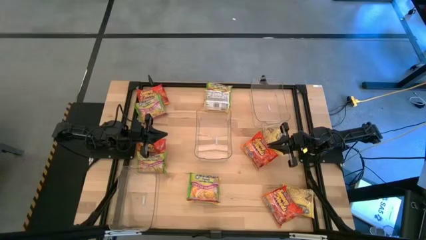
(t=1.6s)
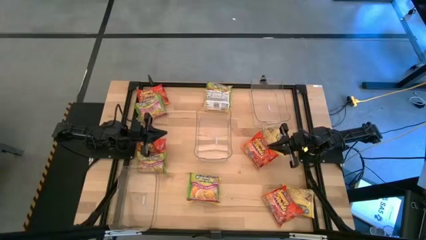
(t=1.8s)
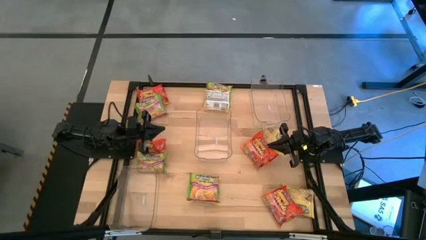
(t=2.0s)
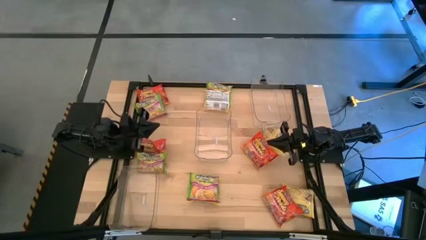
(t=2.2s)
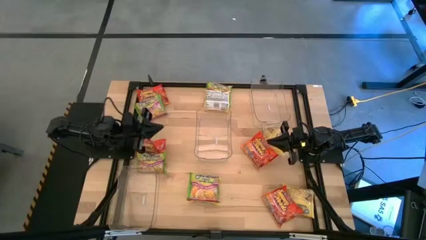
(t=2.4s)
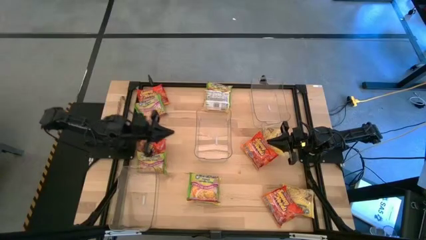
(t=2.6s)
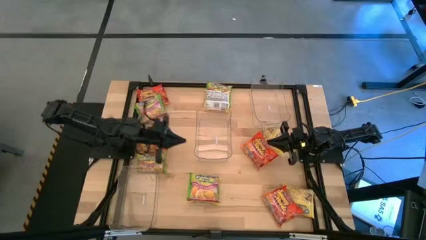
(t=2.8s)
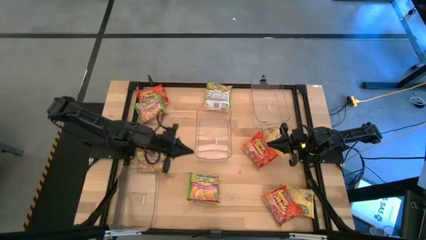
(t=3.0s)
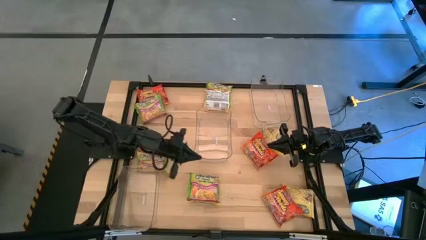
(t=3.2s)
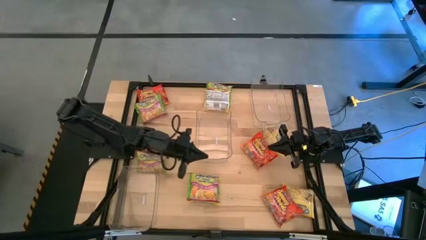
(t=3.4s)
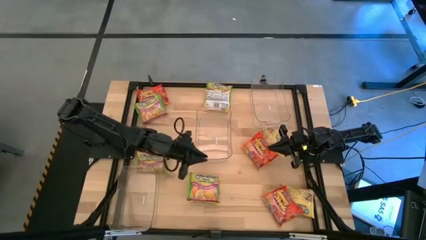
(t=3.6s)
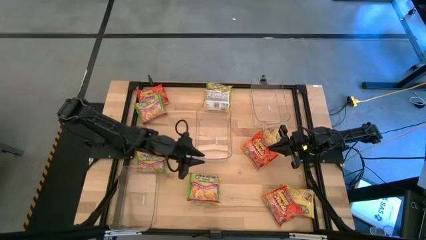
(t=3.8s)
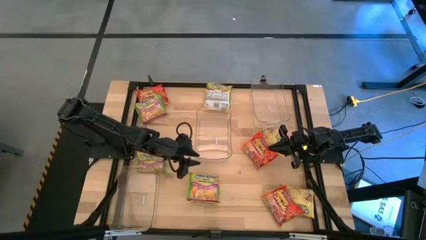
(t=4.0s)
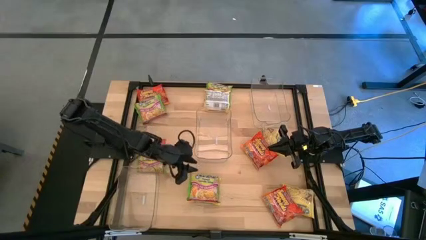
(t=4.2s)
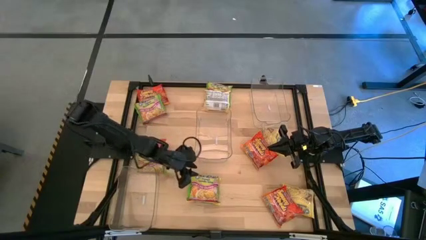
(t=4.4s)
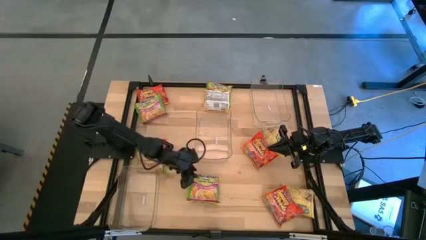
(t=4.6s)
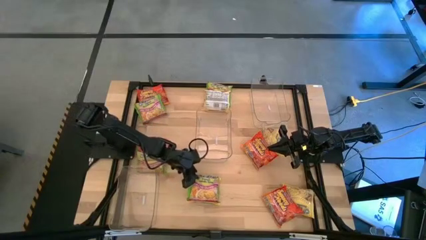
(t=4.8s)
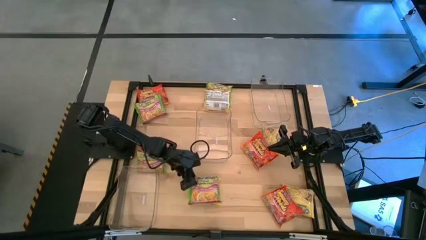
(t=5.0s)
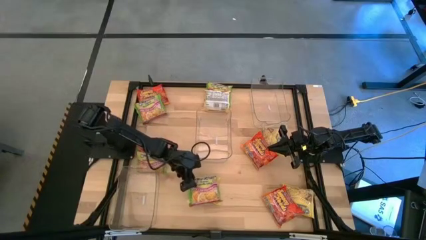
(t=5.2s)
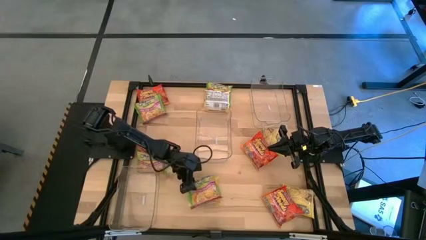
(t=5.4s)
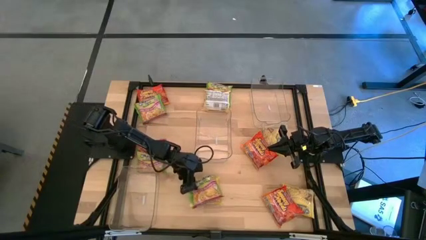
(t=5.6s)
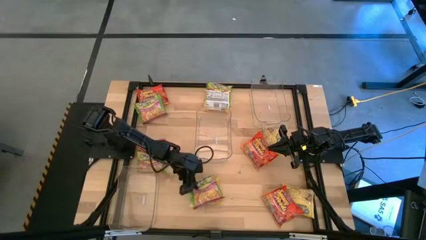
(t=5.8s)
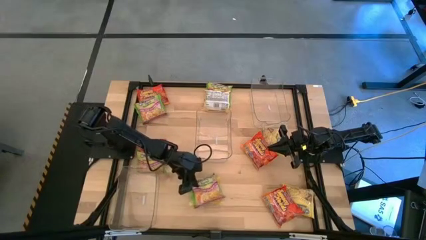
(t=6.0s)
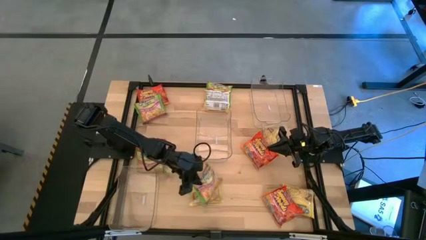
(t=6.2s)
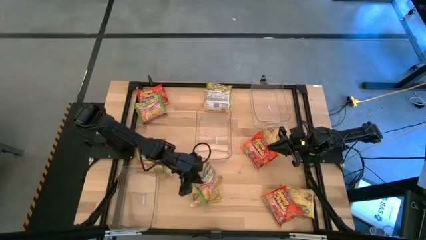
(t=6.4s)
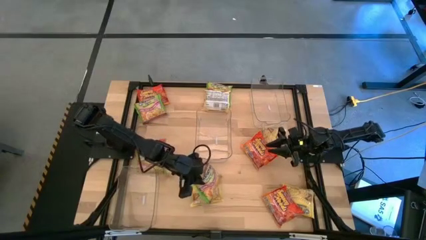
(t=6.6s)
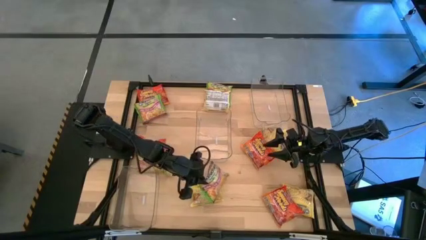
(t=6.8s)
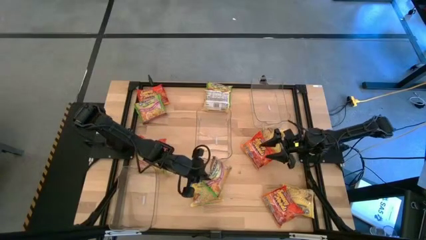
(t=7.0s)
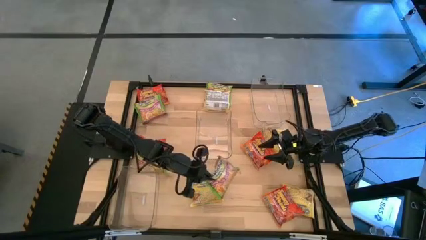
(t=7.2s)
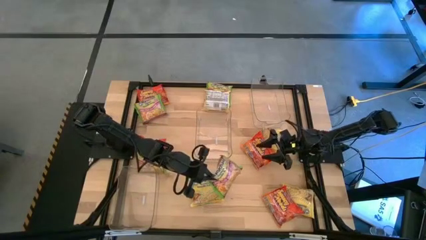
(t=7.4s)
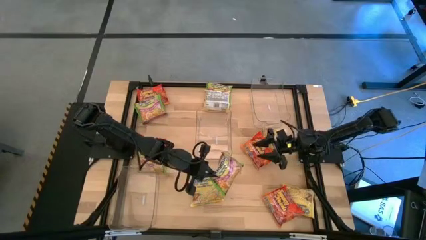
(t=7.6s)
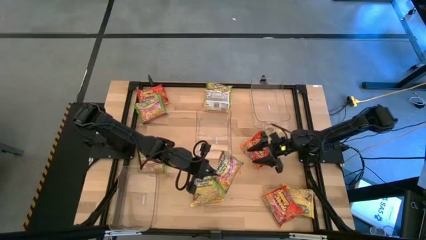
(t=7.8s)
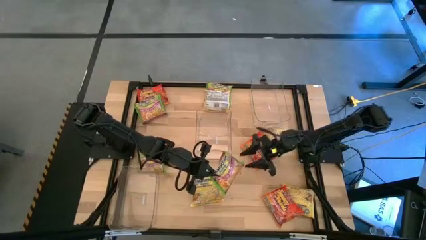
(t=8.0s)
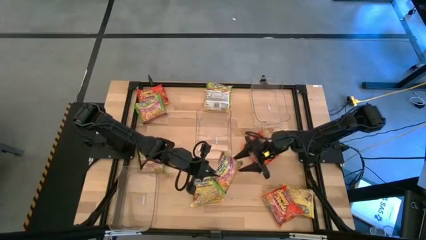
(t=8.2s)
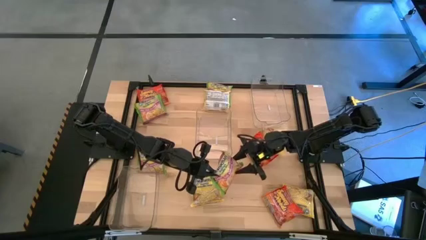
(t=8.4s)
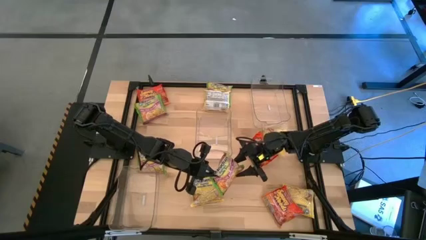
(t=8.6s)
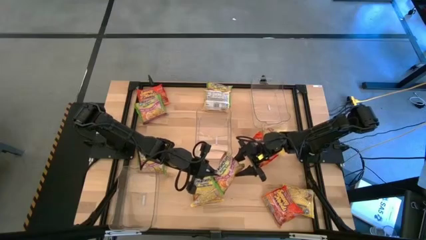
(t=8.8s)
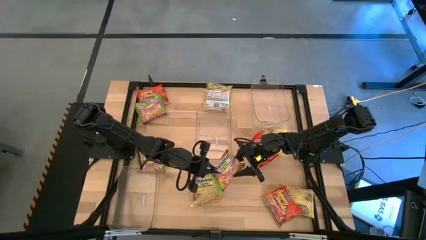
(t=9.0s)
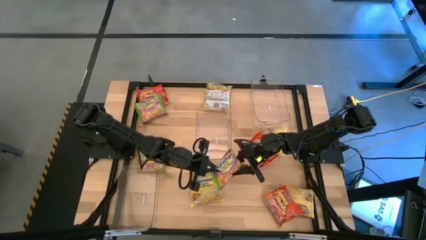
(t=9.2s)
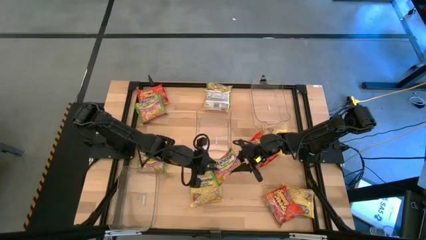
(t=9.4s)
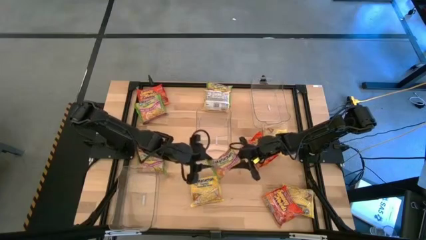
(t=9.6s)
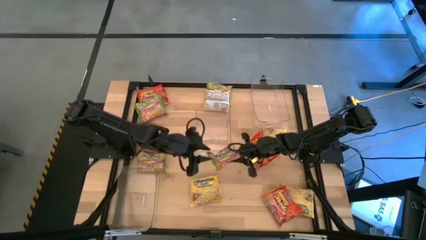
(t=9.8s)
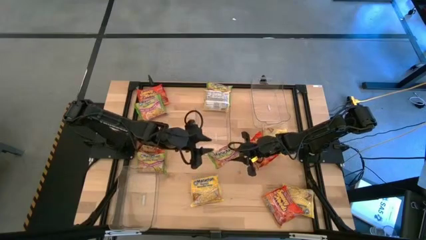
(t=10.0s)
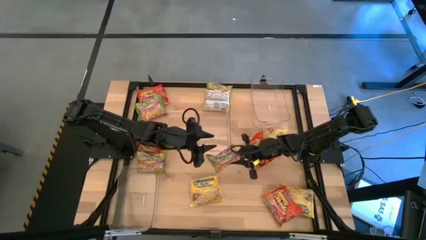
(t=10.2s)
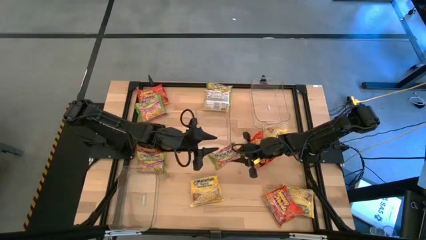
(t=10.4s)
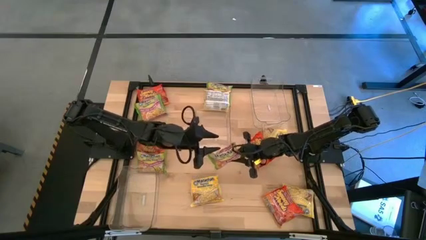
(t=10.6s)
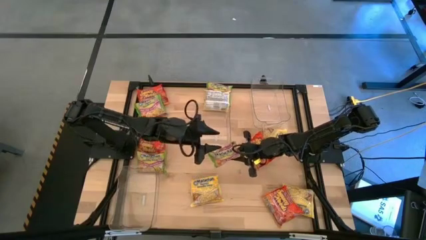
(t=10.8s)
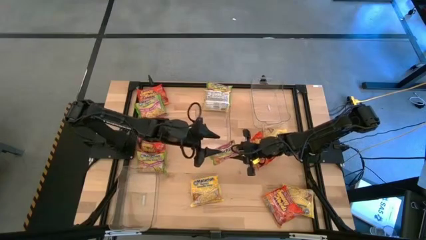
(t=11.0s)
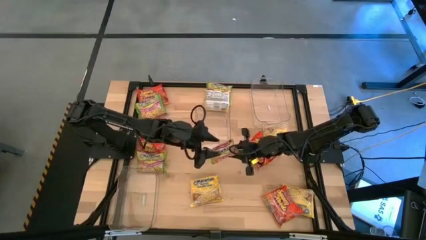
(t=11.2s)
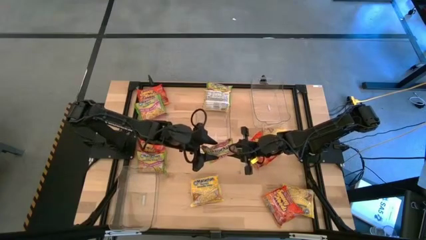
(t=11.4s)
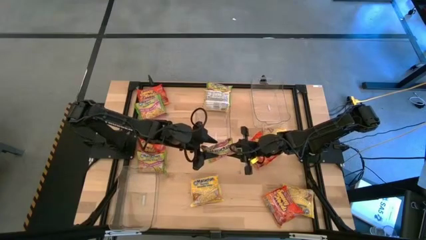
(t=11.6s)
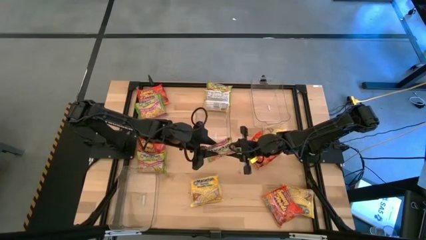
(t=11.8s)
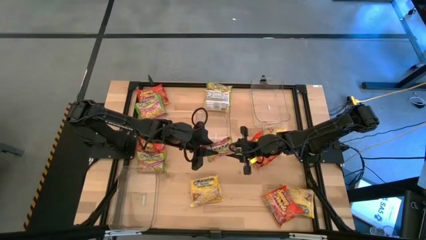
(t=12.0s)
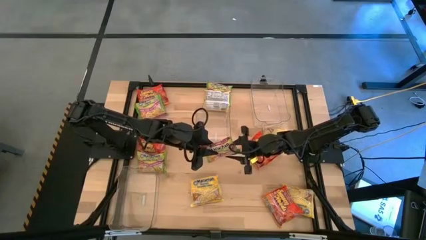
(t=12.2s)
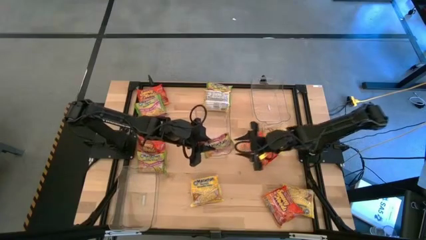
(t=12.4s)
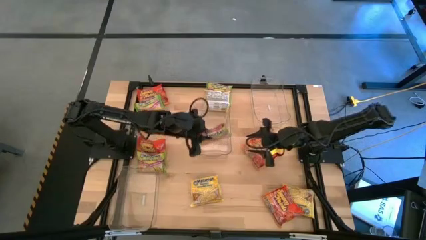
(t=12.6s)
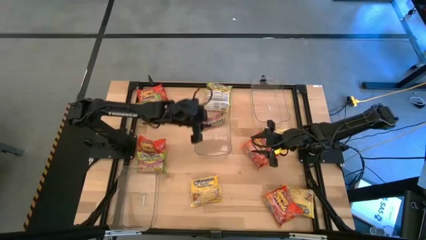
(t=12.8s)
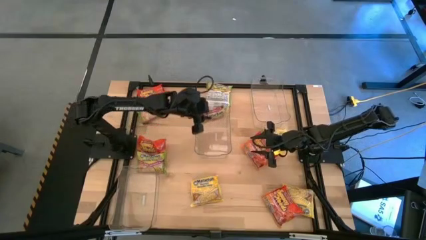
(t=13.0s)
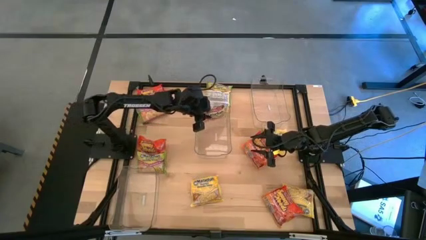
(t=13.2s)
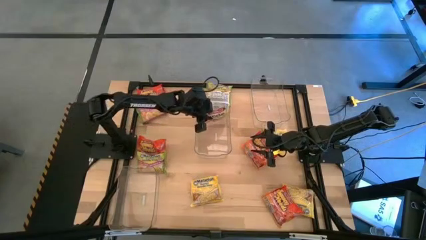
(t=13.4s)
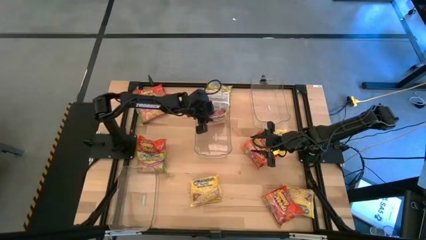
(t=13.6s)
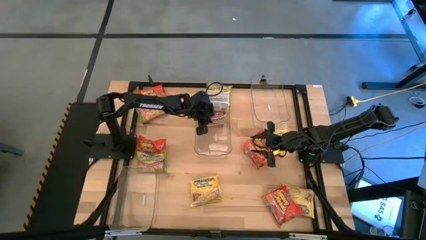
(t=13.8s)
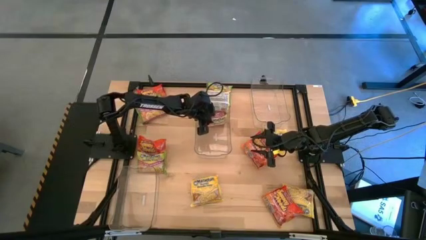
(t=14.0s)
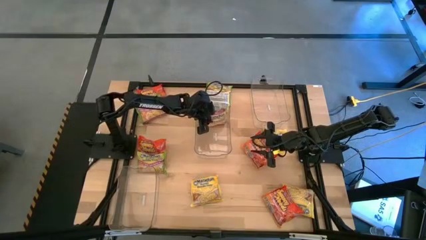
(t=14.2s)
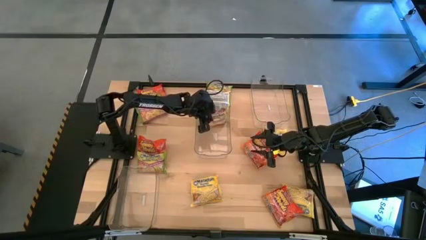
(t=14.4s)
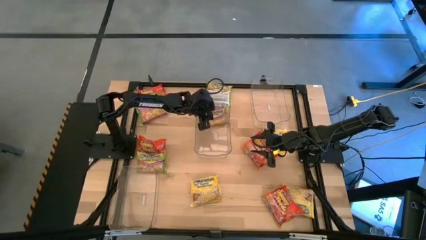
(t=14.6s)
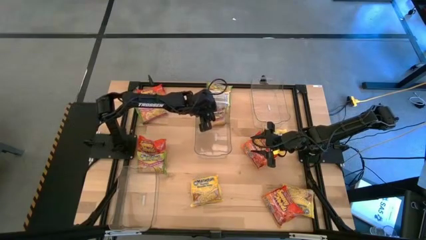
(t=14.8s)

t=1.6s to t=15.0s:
Task: Sort Maruchan noodles
Put the green noodle pack into the middle transparent bin
